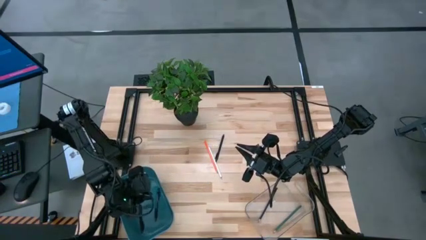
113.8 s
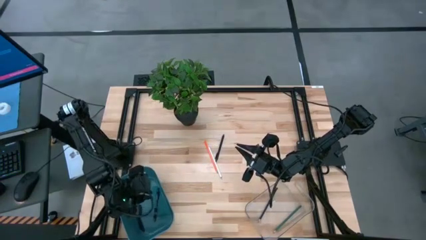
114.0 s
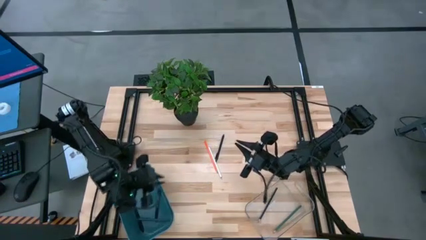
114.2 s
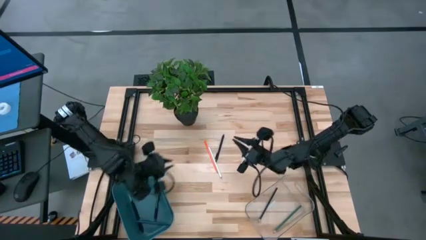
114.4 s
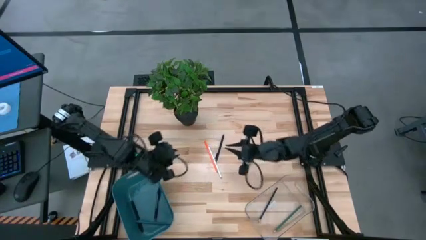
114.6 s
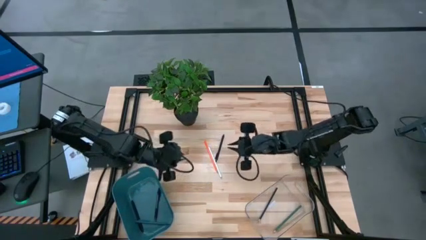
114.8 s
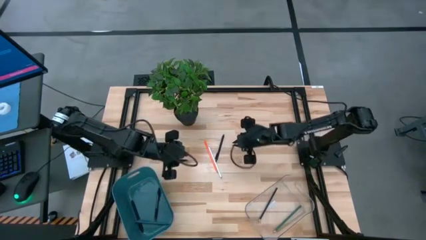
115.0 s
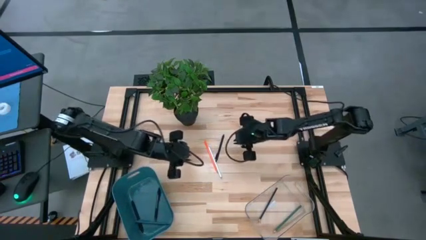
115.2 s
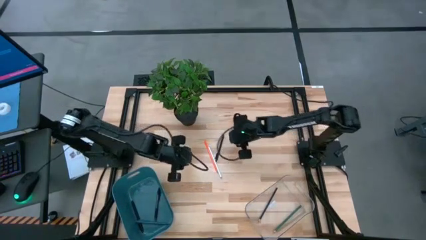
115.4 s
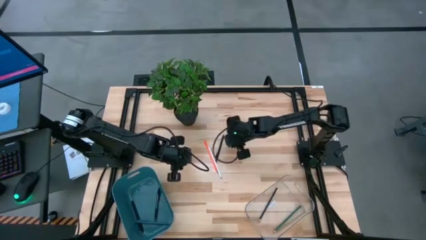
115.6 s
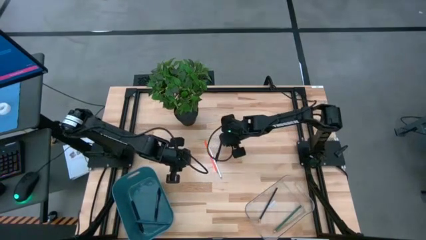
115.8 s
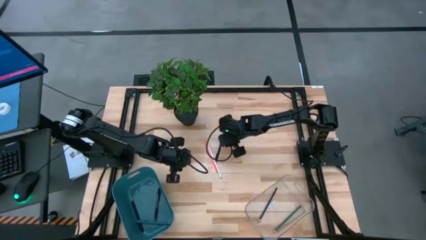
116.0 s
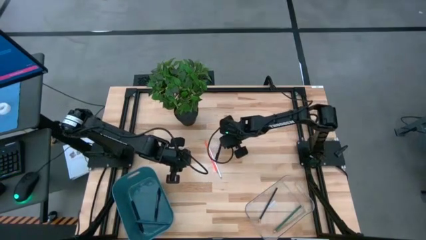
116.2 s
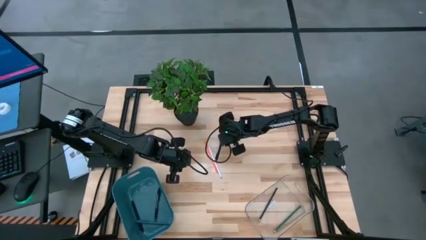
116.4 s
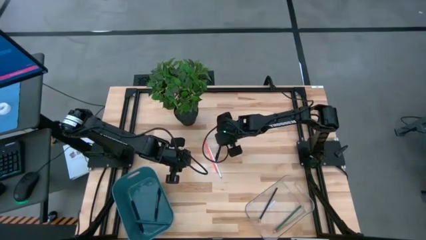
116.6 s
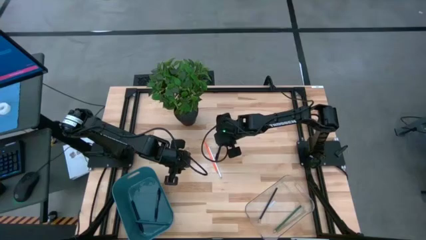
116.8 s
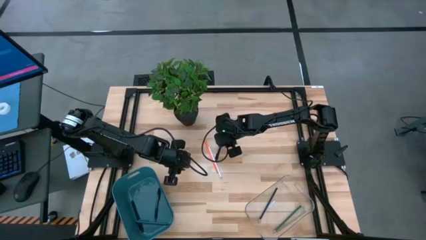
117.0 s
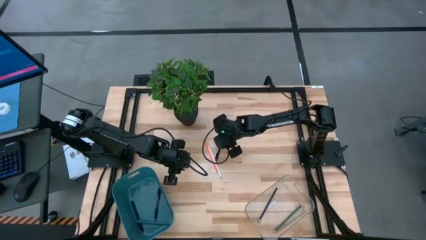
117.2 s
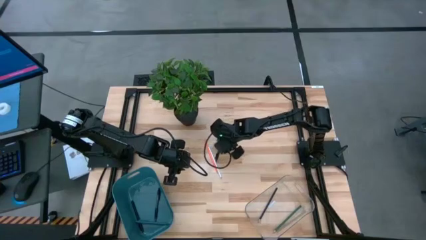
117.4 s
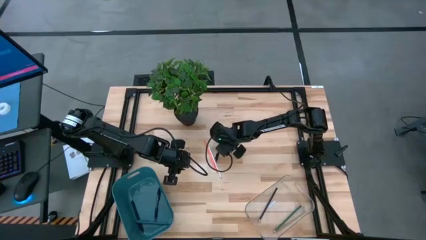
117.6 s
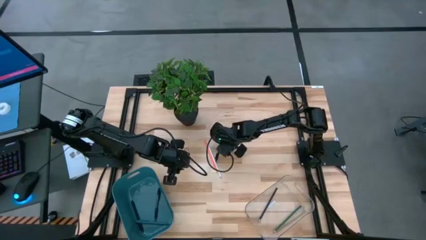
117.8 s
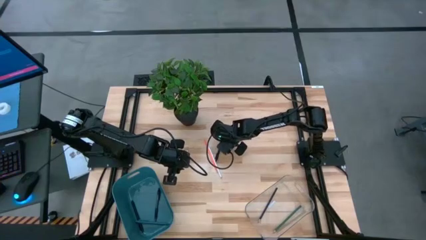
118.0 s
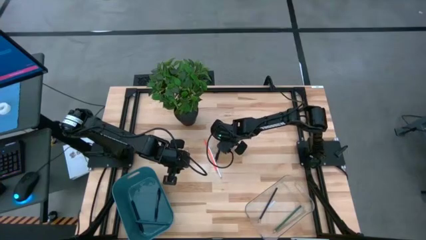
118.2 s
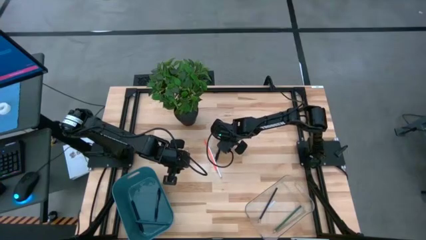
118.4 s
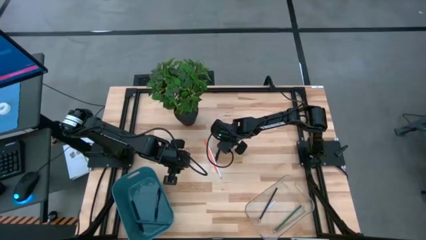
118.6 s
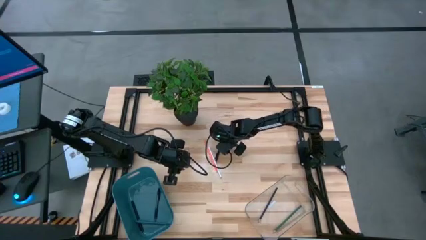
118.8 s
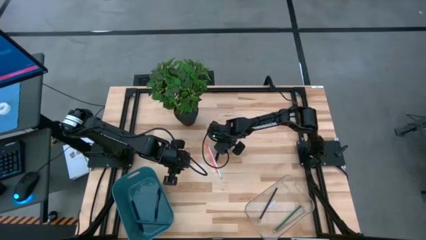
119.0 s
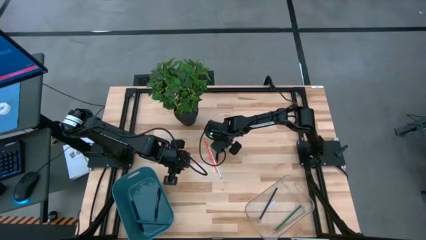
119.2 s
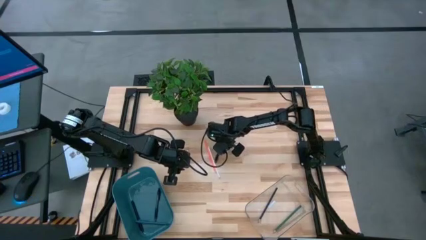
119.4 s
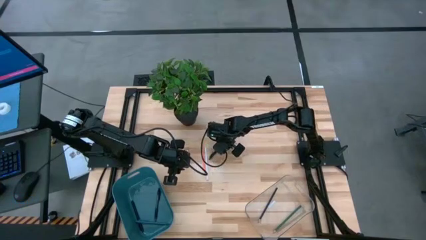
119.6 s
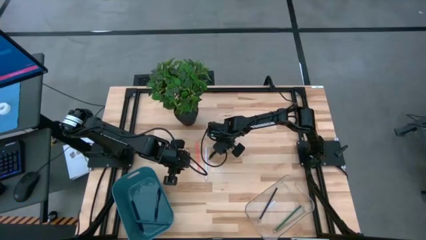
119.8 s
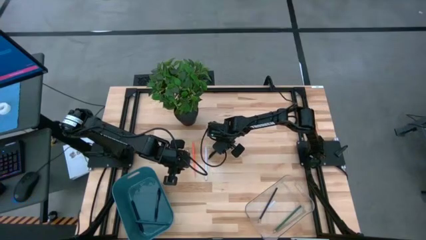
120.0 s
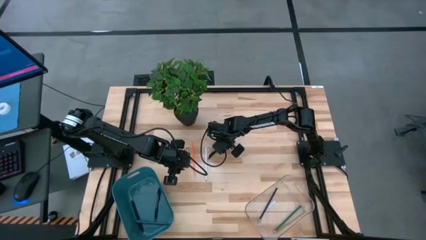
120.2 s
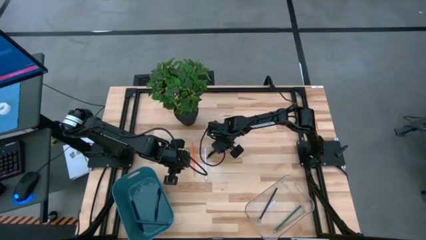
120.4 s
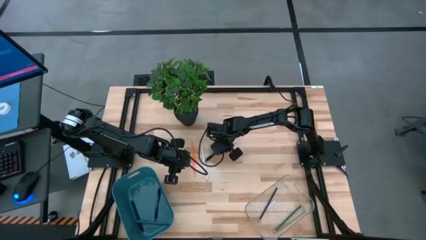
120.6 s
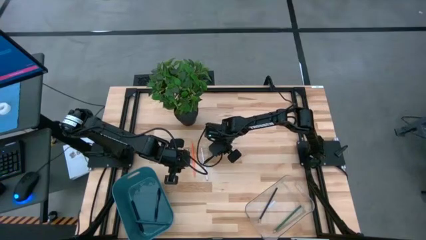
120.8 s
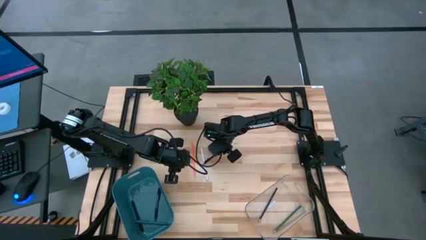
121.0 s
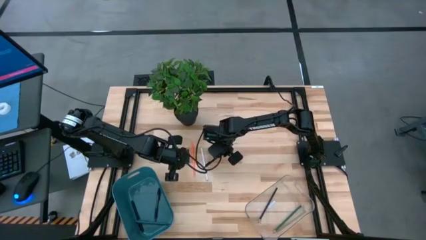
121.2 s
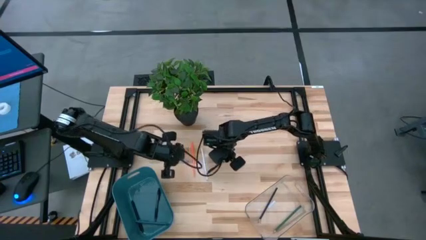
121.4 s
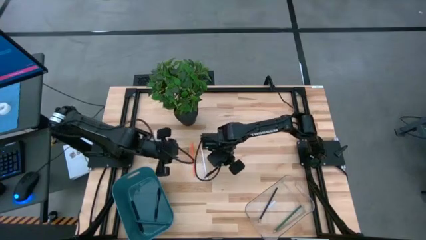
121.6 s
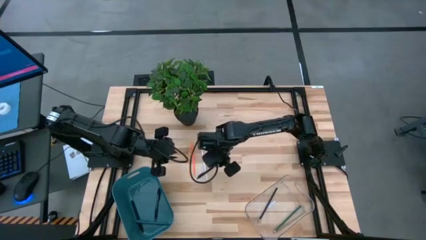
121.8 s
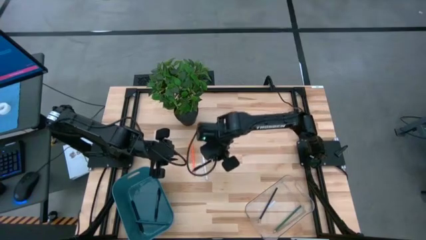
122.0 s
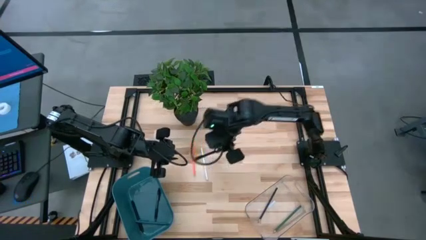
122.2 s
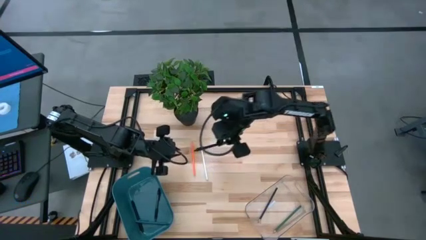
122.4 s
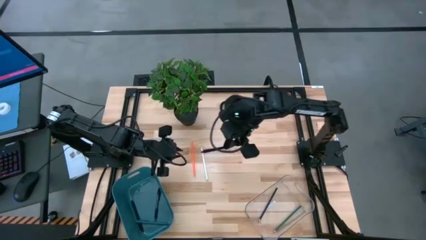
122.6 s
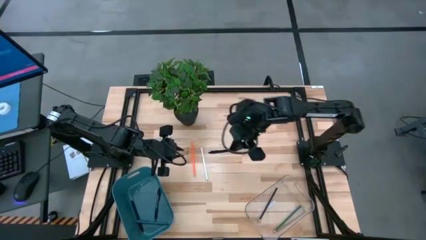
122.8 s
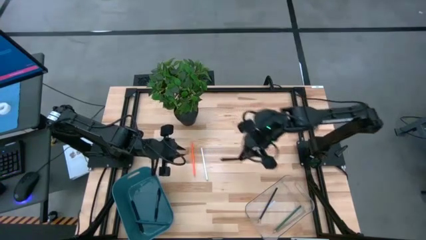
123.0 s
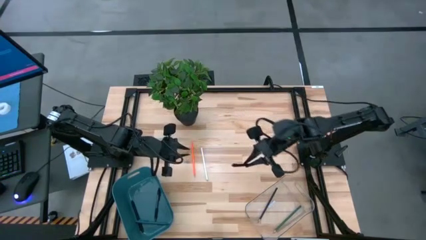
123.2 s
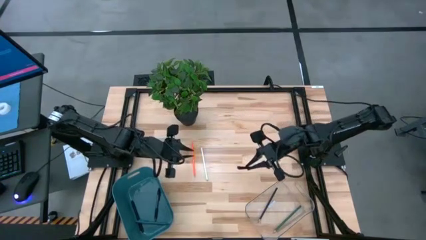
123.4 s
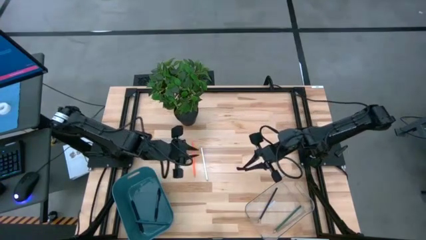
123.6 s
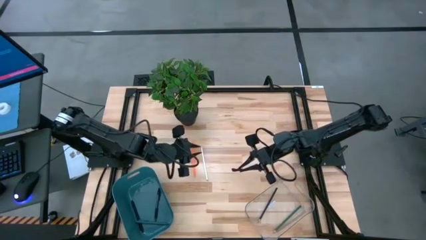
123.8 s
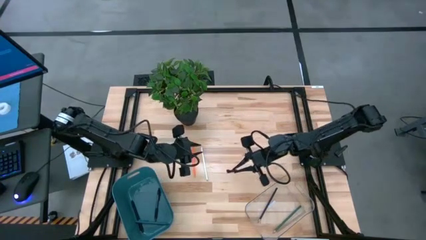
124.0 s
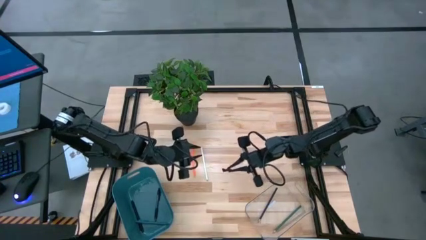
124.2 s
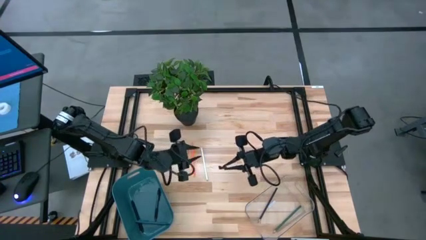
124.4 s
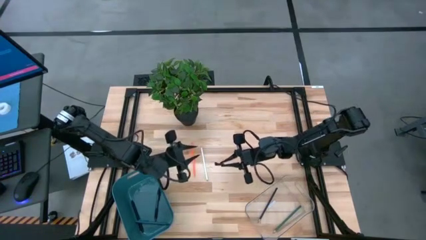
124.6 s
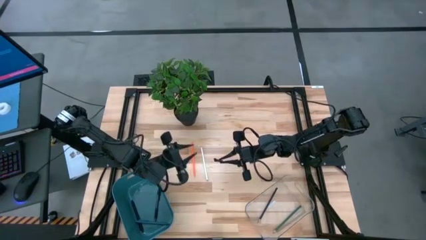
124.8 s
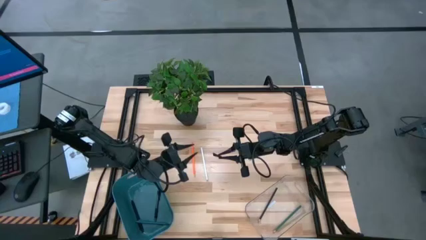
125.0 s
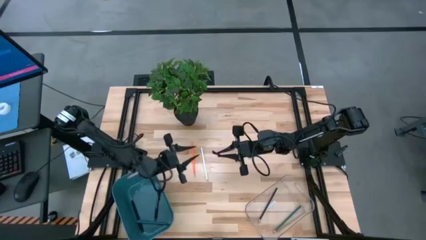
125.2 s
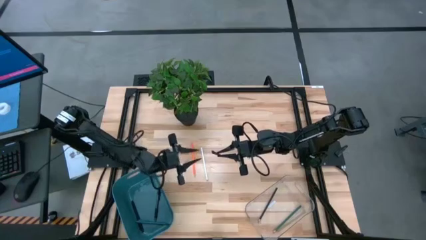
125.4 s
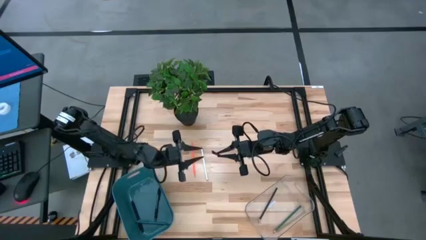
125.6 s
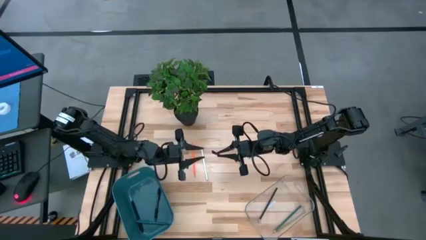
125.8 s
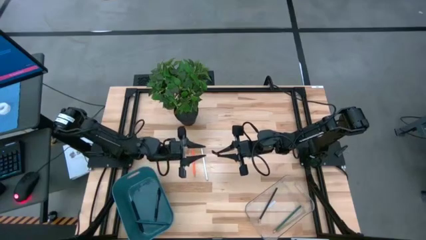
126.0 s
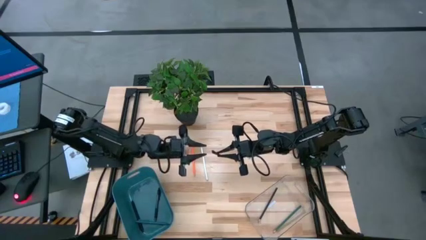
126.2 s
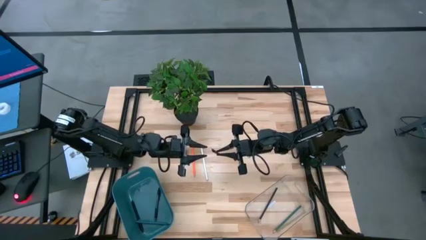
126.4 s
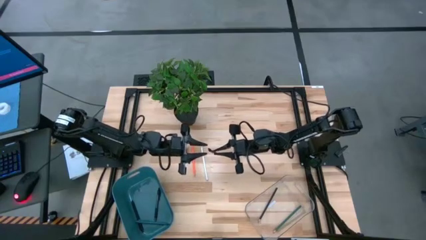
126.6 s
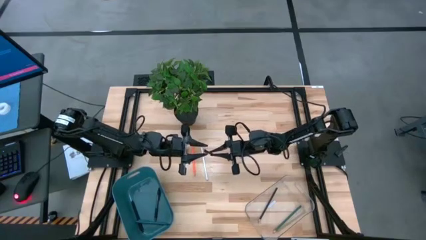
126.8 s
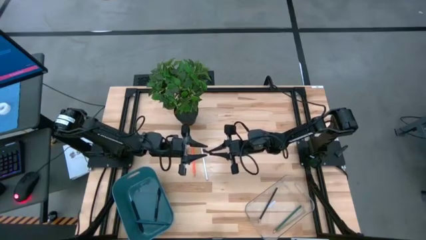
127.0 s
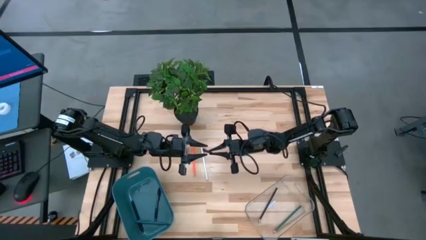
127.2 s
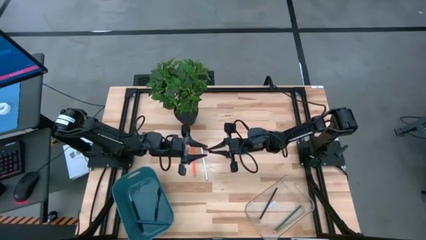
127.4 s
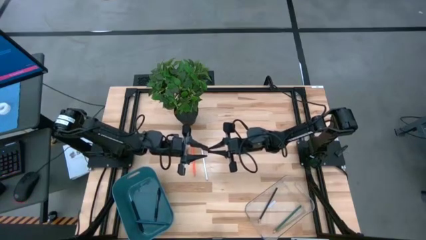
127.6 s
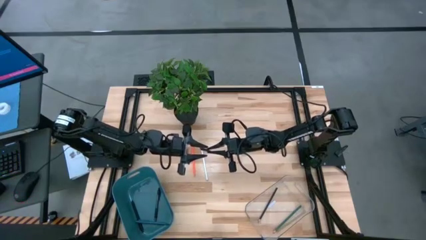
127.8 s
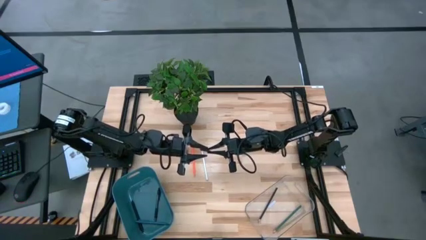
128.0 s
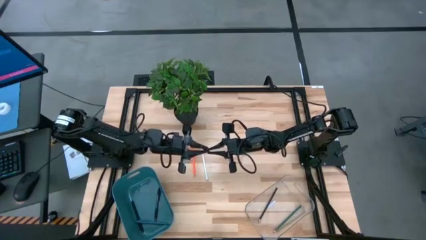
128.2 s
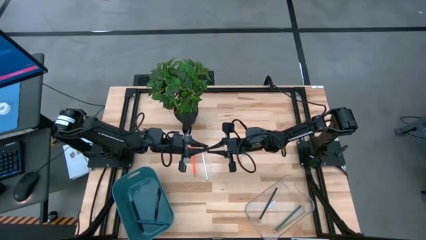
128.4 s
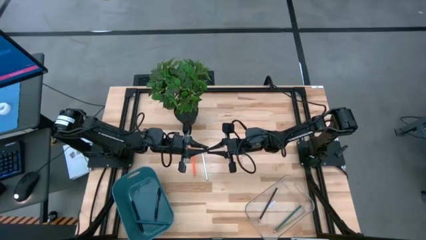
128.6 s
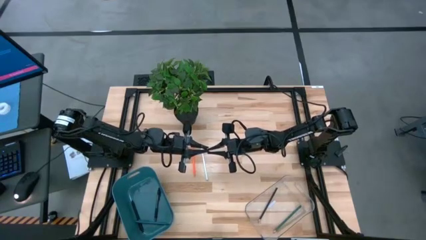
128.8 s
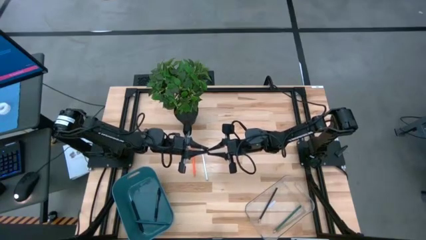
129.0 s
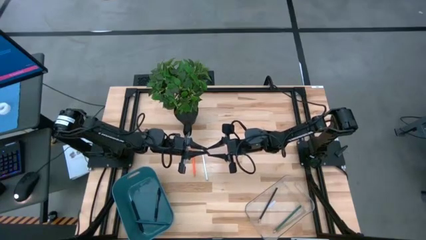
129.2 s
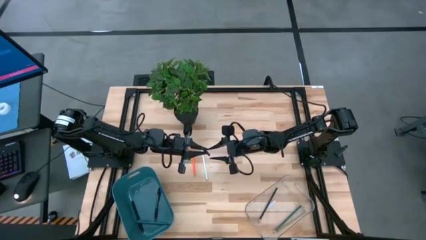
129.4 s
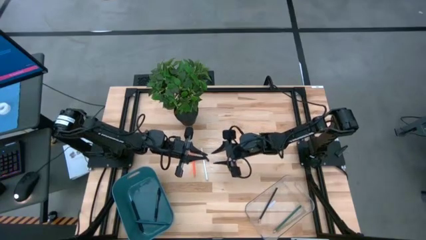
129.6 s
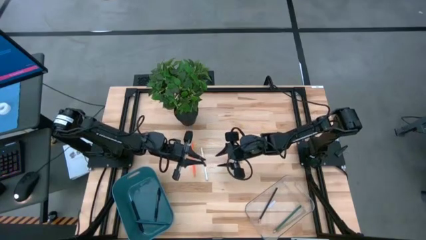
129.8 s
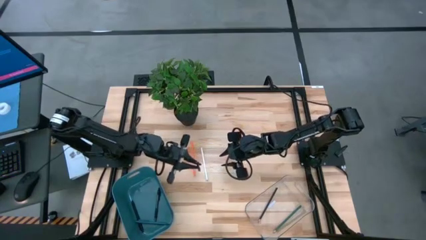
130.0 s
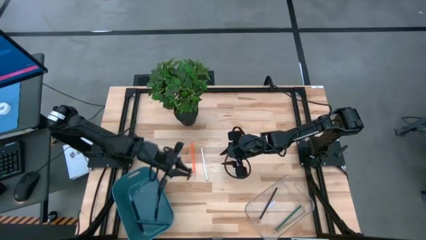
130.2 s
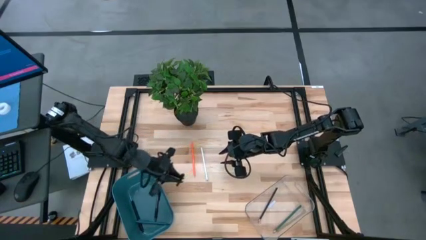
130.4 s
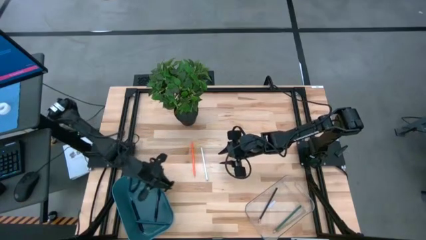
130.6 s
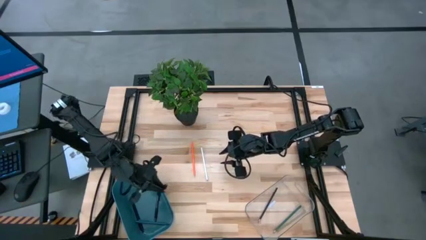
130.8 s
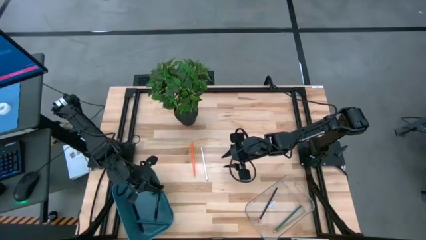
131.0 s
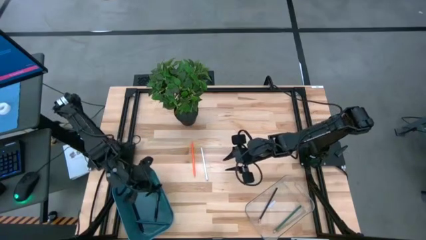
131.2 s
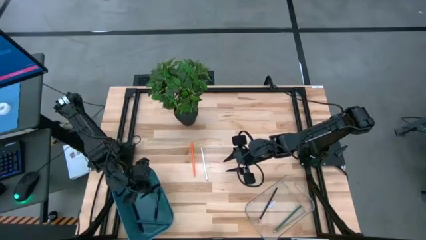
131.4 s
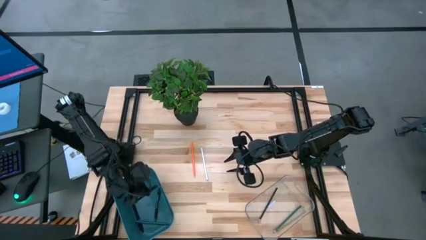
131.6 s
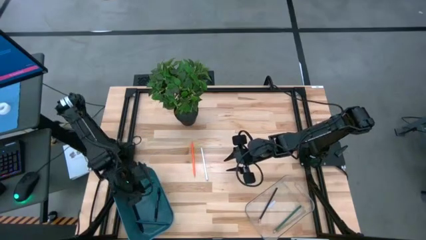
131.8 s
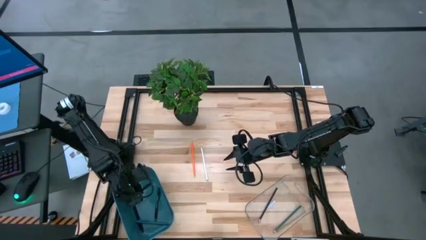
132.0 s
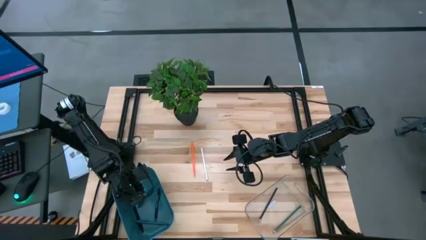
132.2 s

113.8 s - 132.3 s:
Task: Sort pens & pencils
Put the black pen into the blue bin
